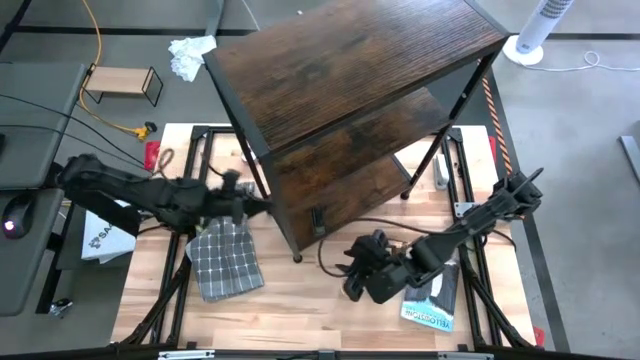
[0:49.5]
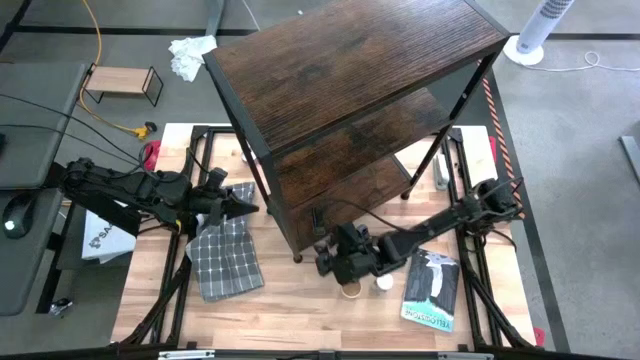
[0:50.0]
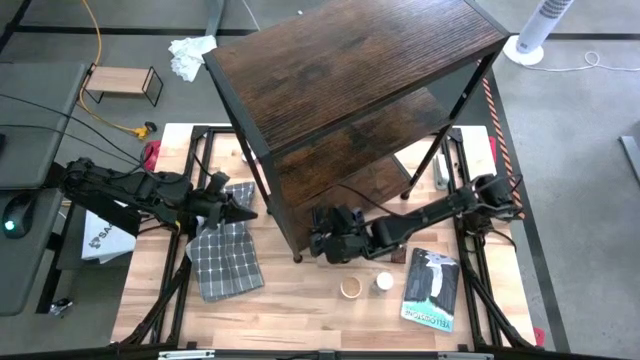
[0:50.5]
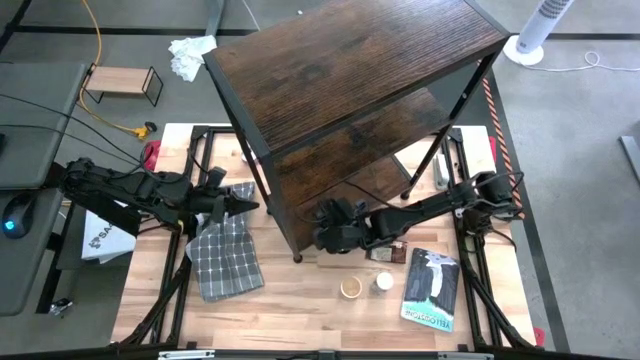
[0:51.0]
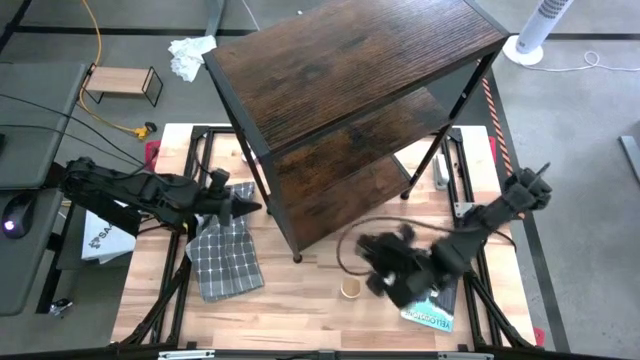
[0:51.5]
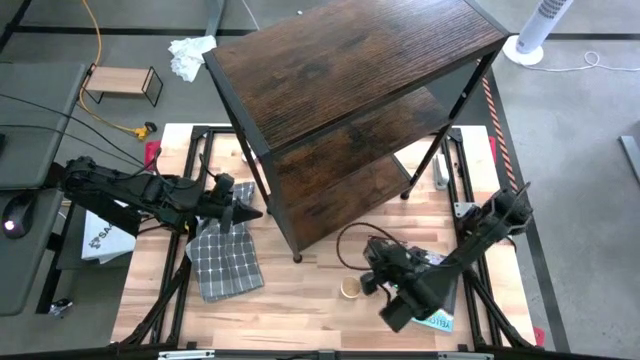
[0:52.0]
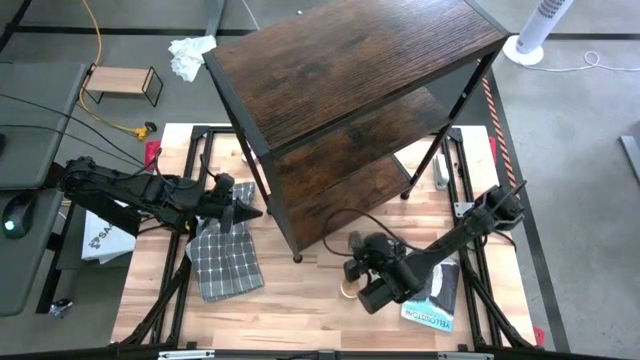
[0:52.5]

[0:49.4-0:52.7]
Task: Shelf spices
Remove the green seasoning can from the shelf

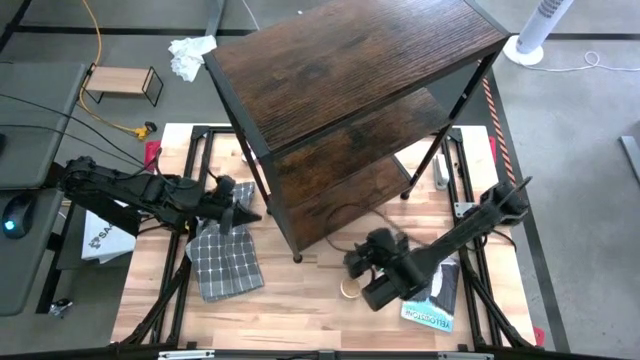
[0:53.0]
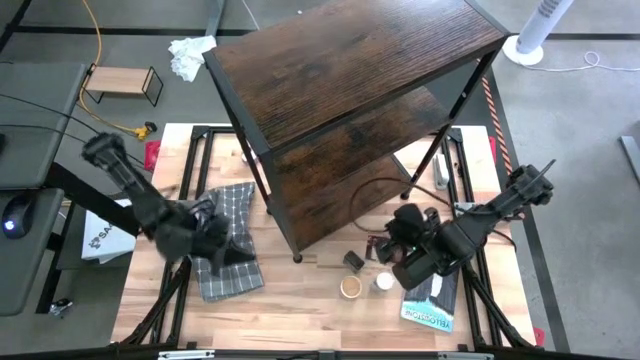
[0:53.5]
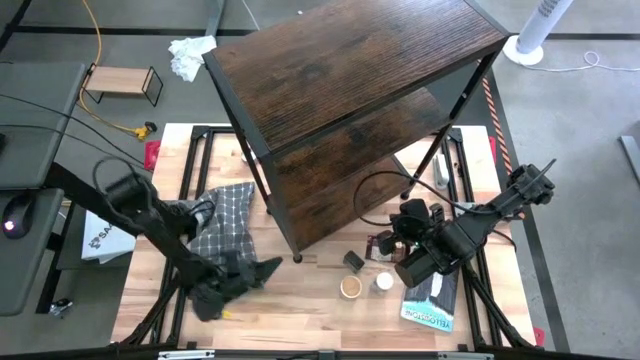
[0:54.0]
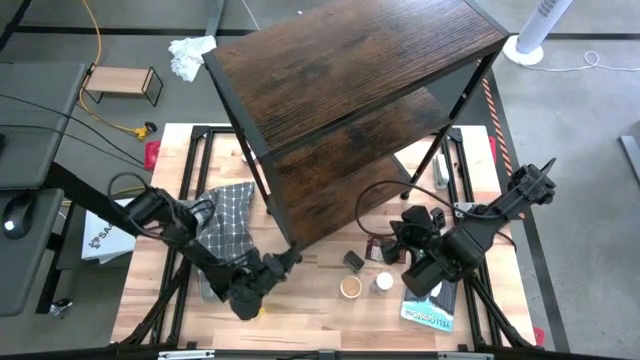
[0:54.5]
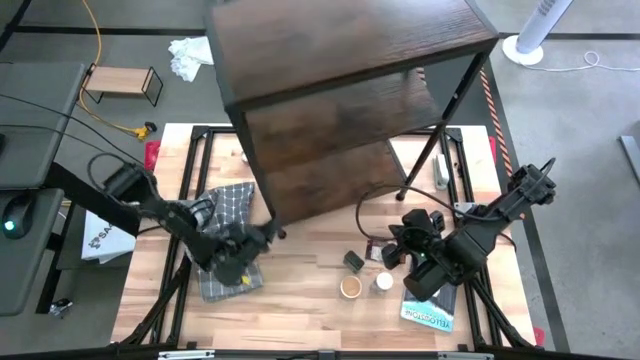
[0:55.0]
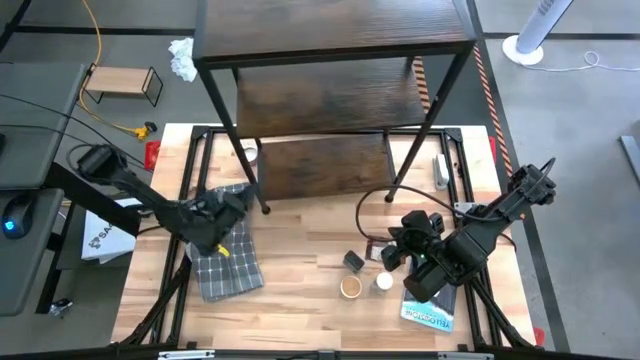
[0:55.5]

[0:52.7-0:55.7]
Adjust the shelf

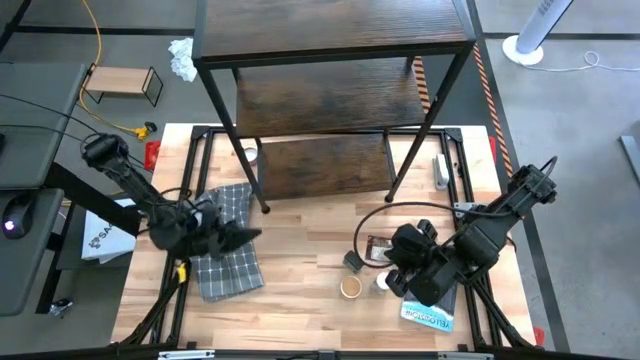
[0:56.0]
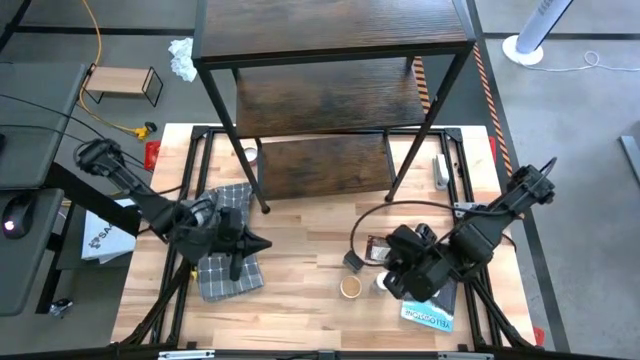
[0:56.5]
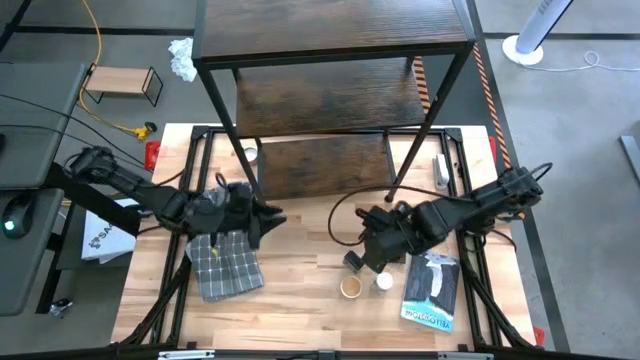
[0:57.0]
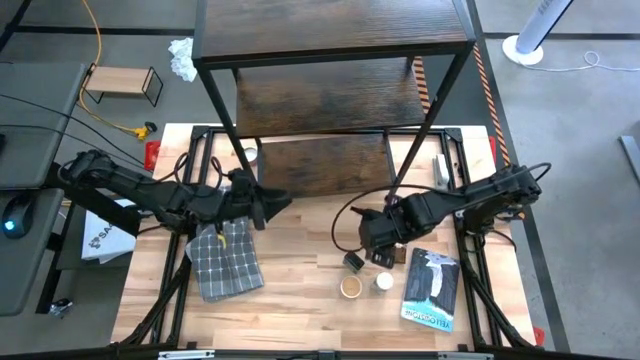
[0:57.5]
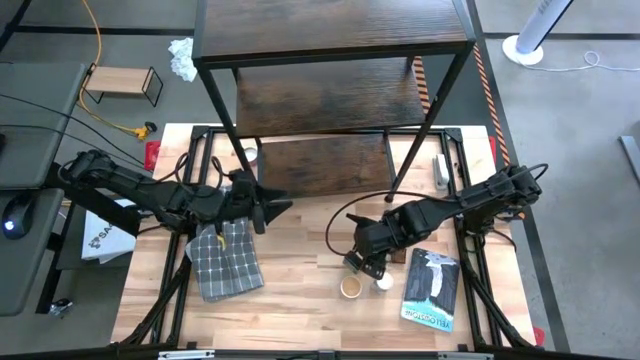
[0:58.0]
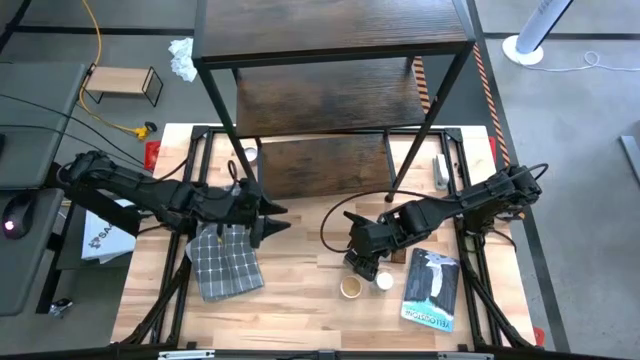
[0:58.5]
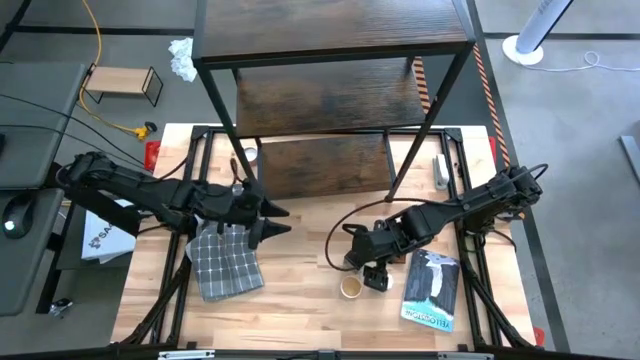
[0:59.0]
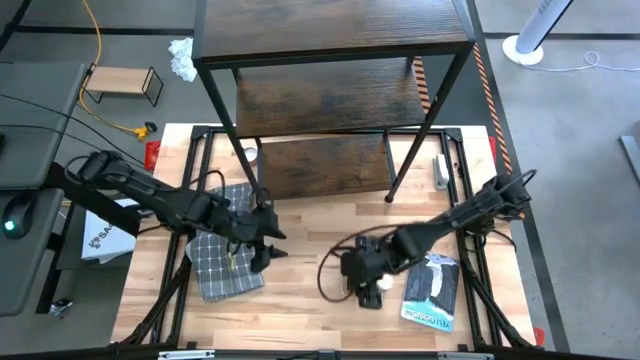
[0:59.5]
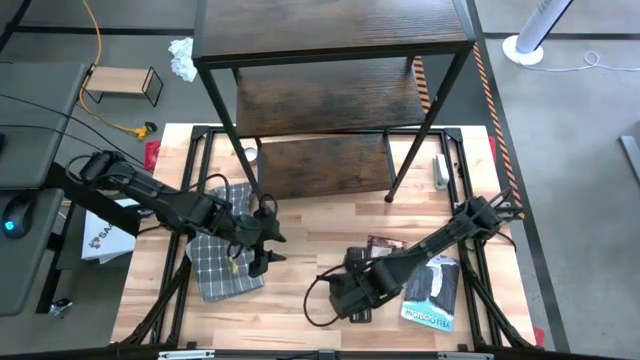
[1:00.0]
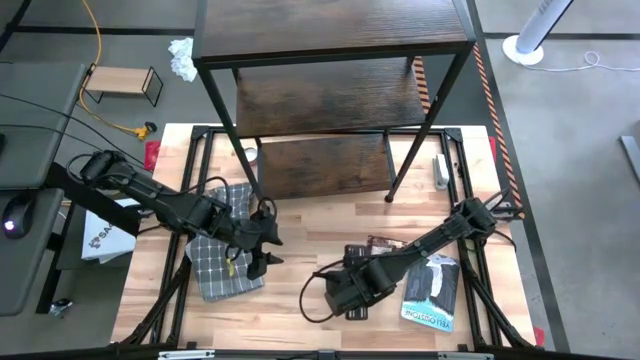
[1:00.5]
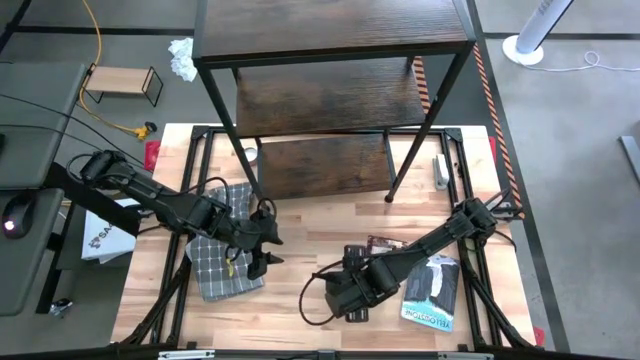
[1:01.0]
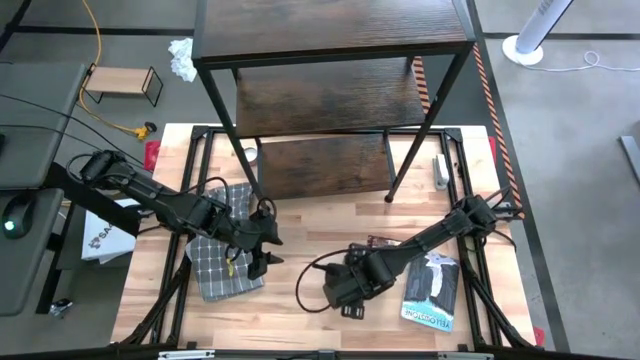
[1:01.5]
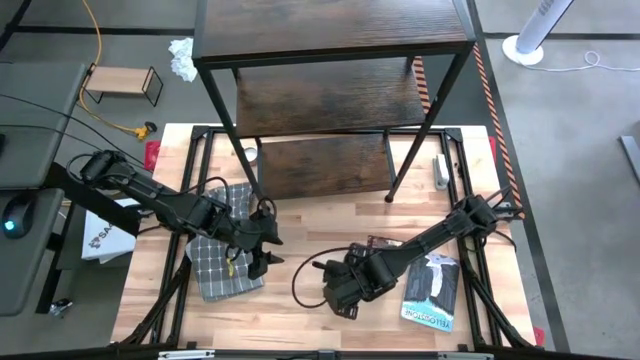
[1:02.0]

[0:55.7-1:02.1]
Put the gold seasoning bottle on the shelf

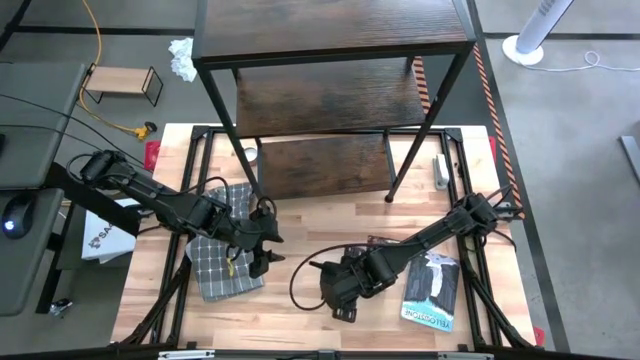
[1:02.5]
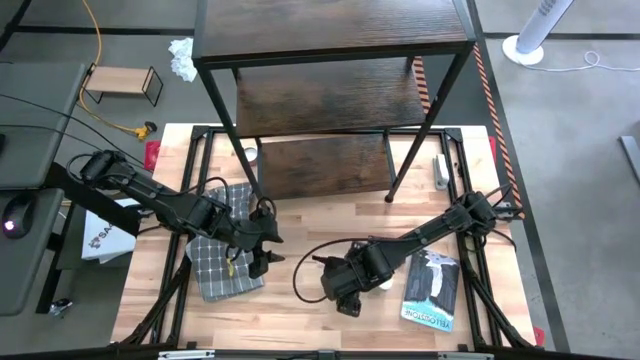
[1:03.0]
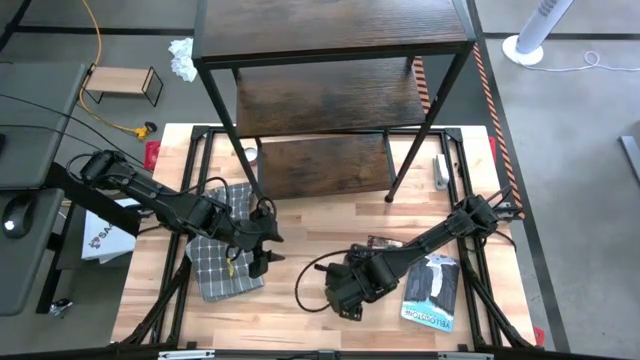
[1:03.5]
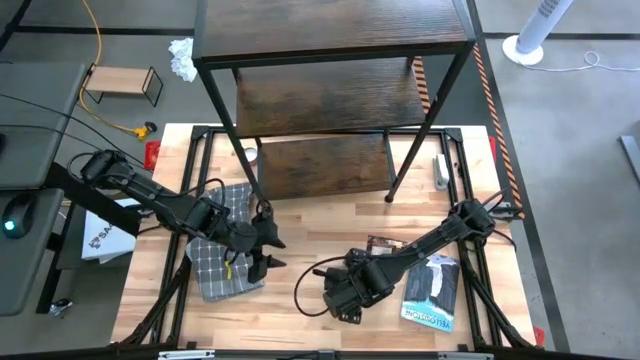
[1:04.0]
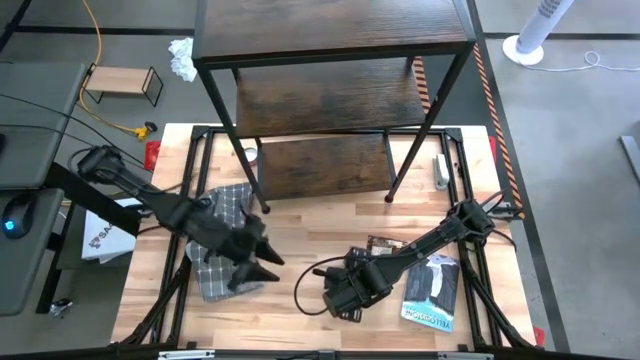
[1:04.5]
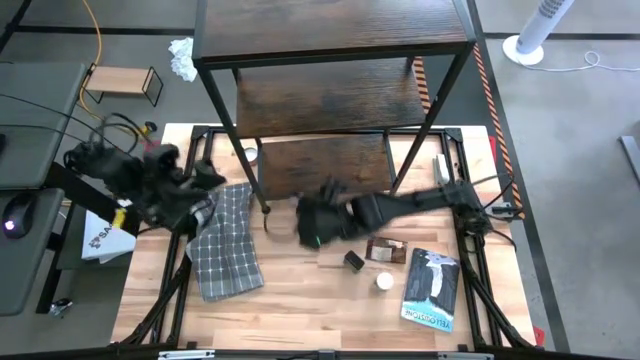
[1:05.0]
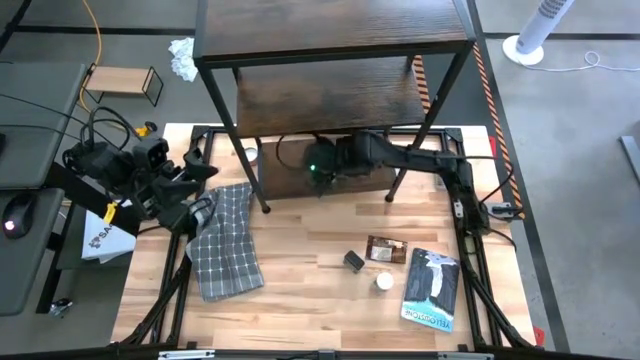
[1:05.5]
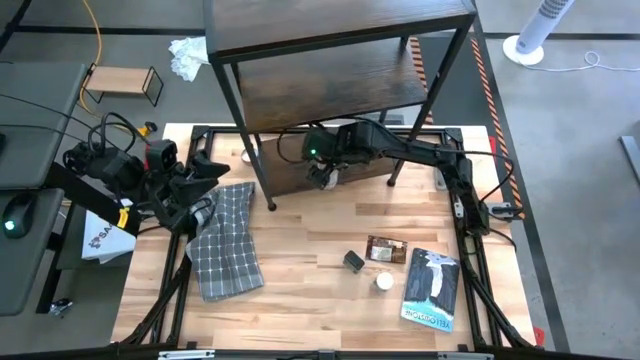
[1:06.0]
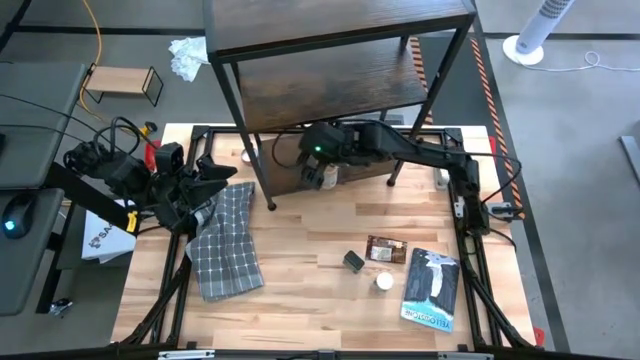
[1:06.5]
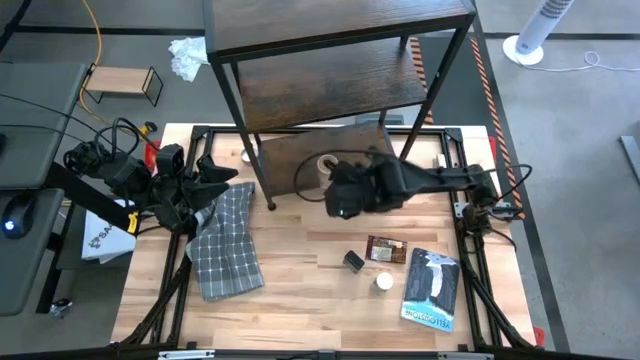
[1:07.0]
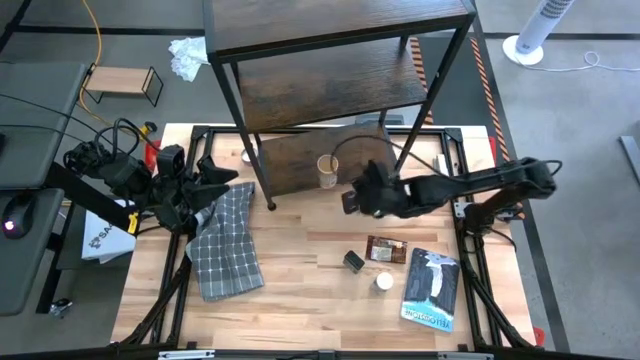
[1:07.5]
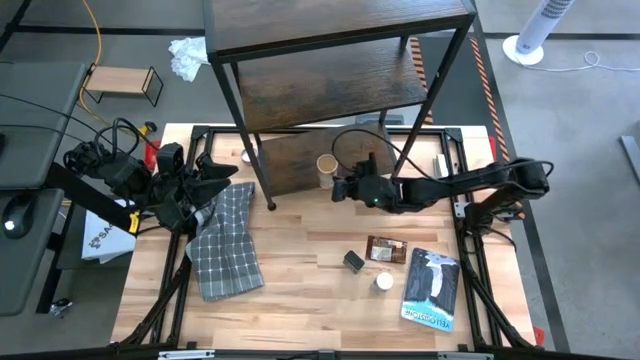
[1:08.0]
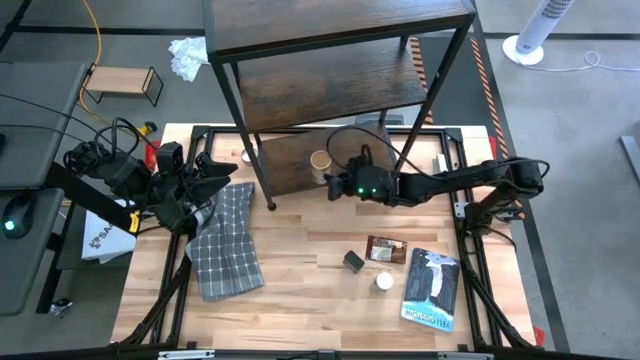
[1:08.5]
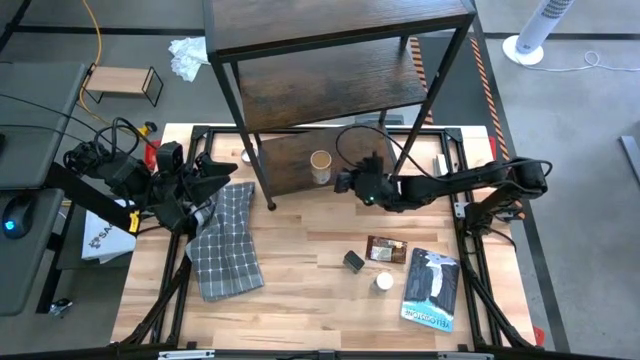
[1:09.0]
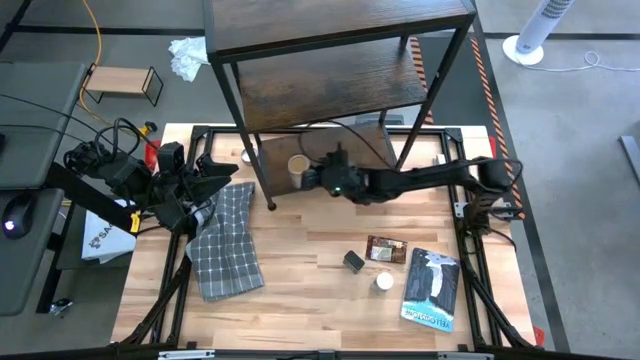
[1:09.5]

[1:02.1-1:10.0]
Put the gold seasoning bottle on the shelf

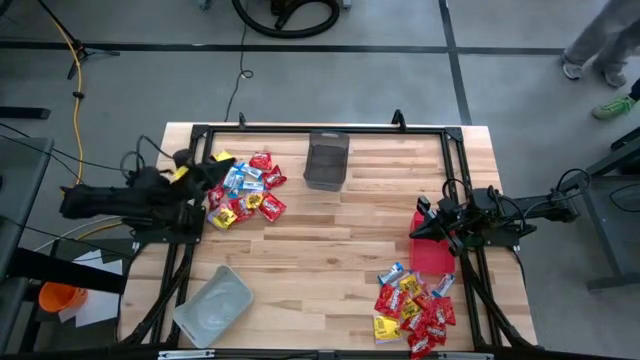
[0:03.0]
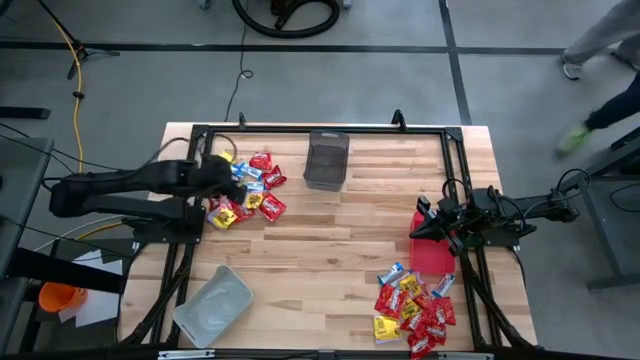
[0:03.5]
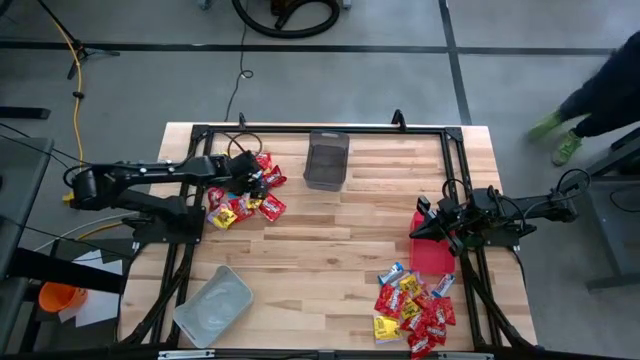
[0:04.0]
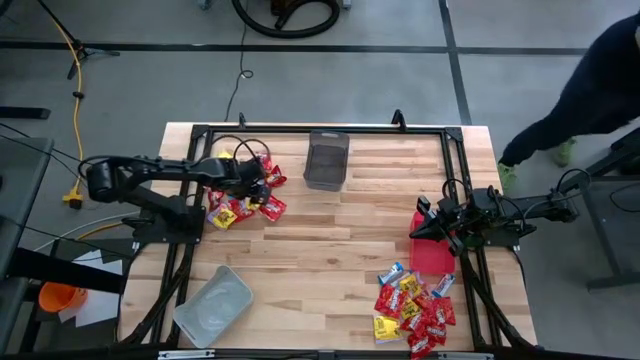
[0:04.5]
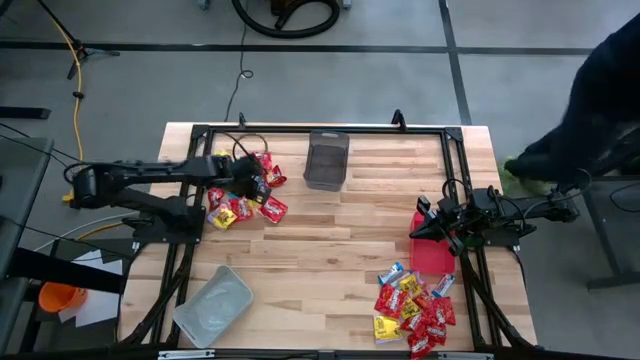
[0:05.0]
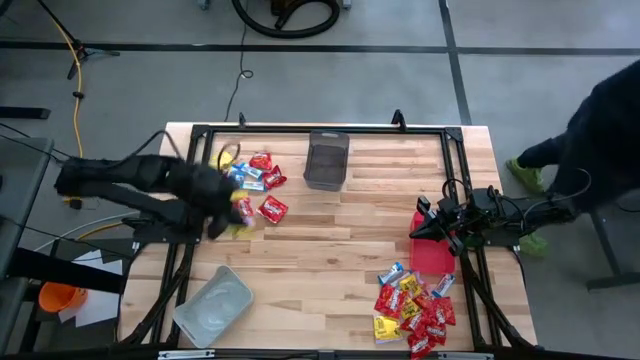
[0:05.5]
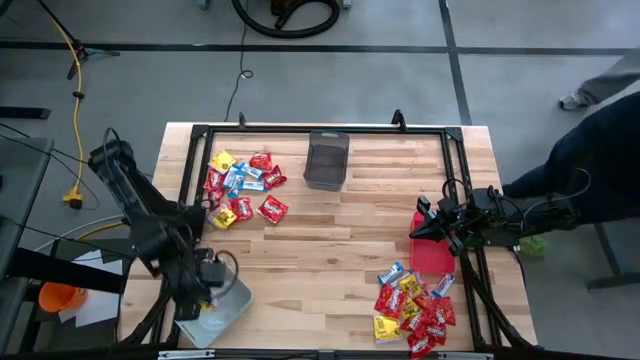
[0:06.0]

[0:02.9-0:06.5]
Task: Sort candy
Put the yellow candy pack into the gray bin
